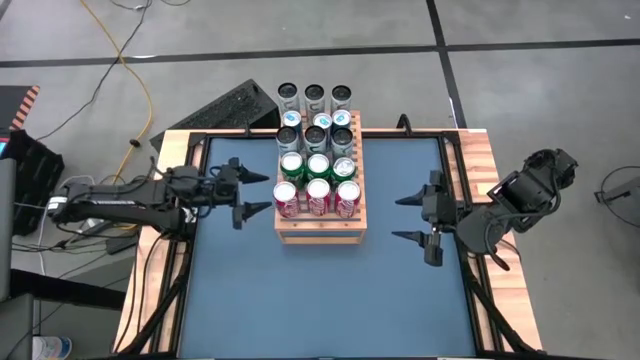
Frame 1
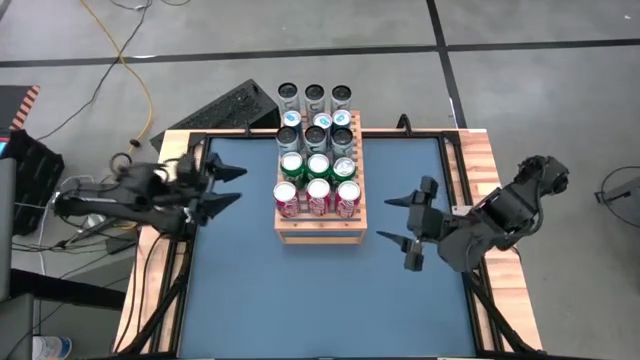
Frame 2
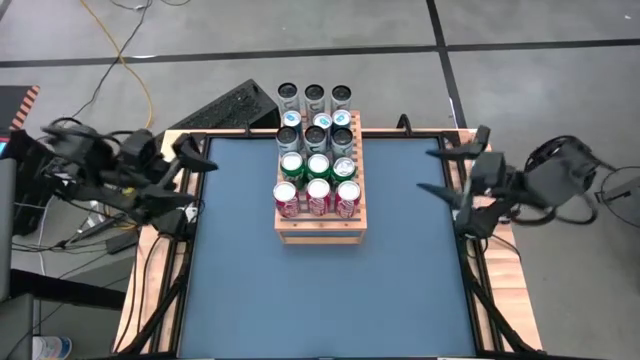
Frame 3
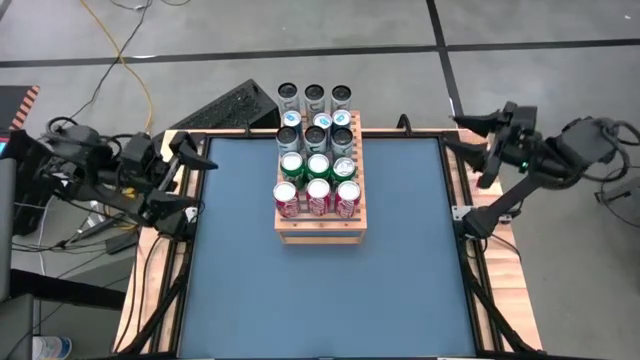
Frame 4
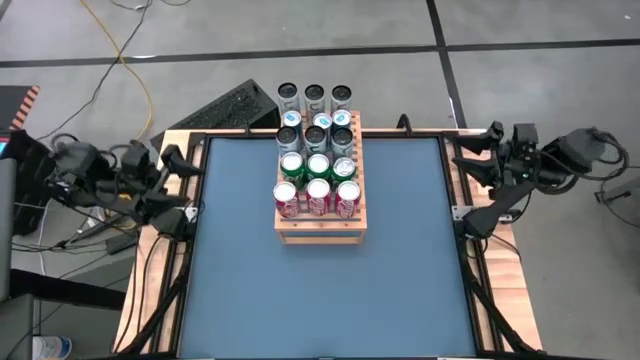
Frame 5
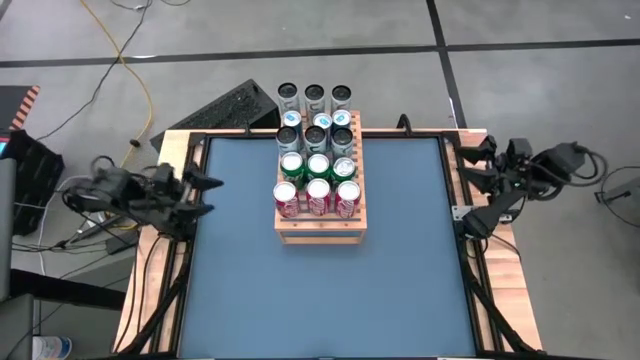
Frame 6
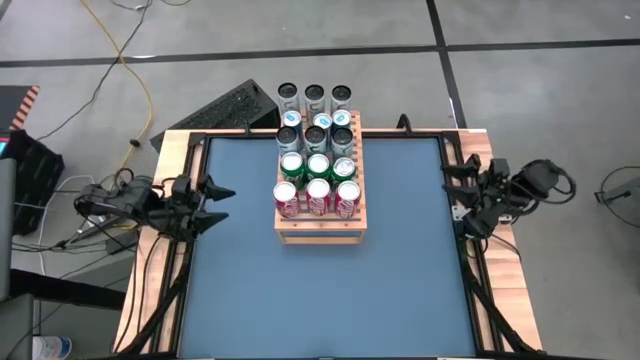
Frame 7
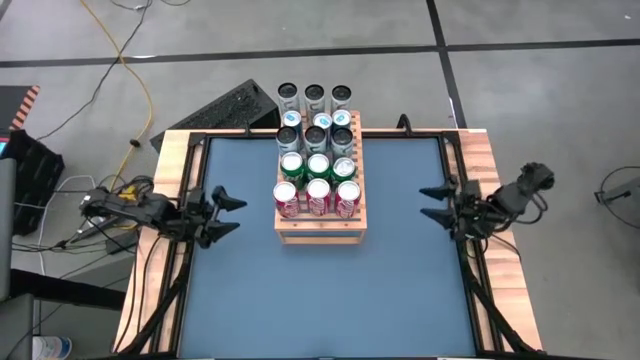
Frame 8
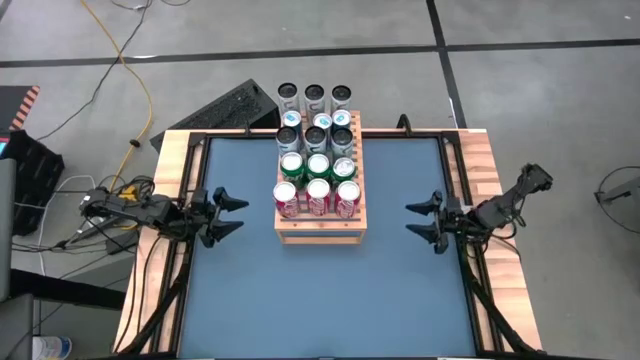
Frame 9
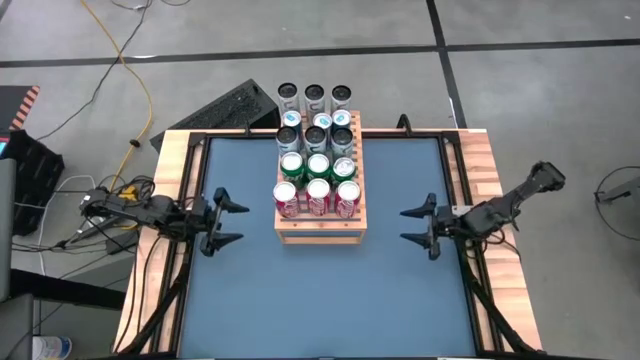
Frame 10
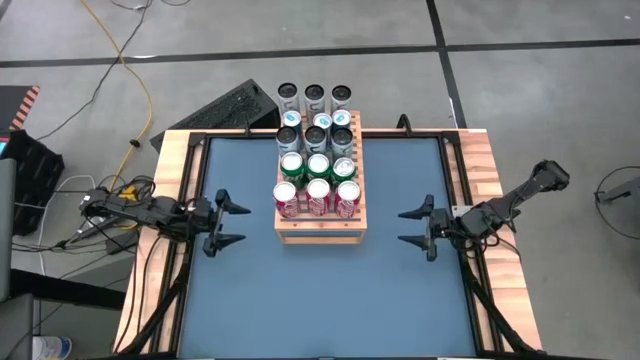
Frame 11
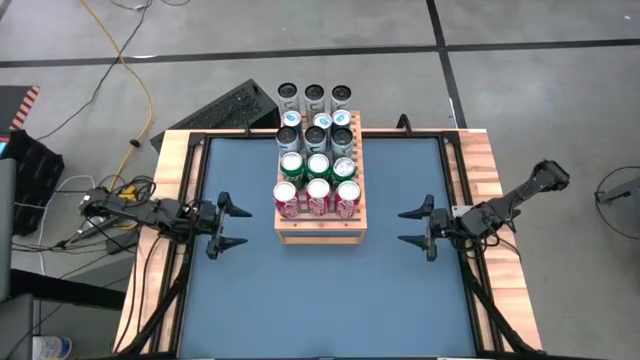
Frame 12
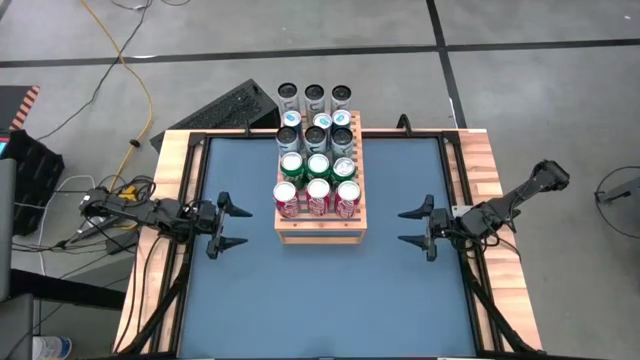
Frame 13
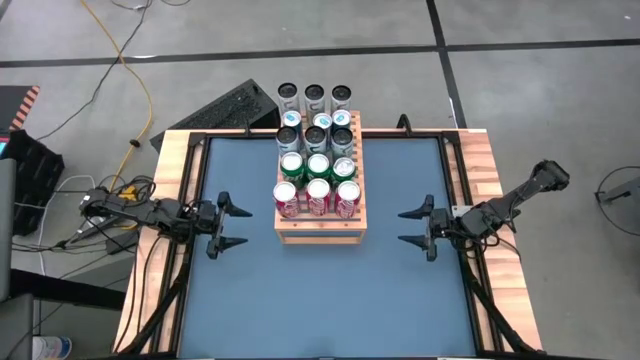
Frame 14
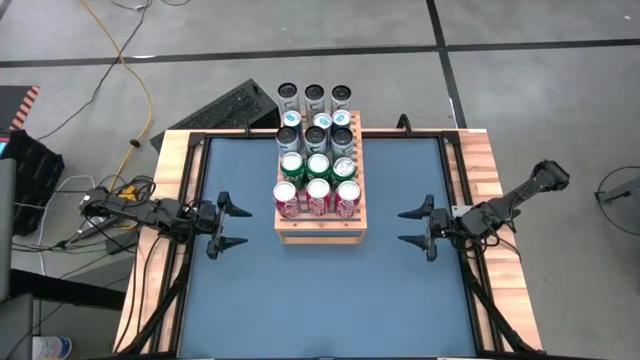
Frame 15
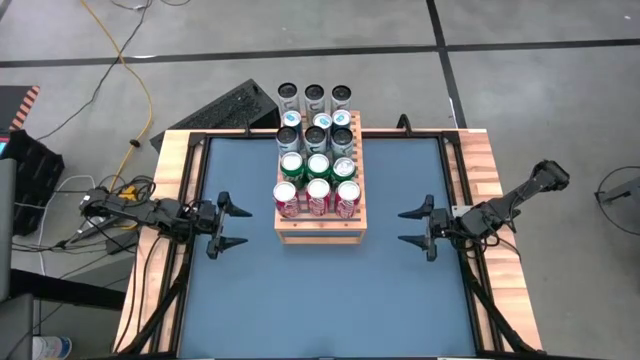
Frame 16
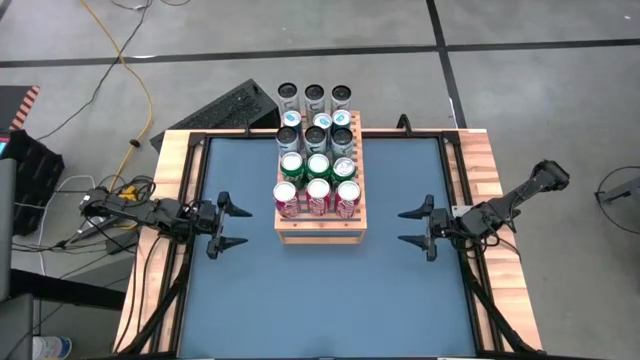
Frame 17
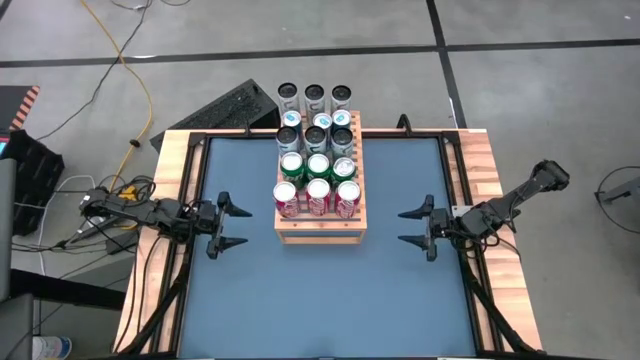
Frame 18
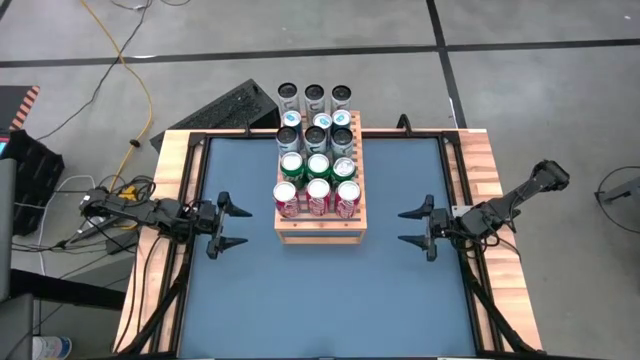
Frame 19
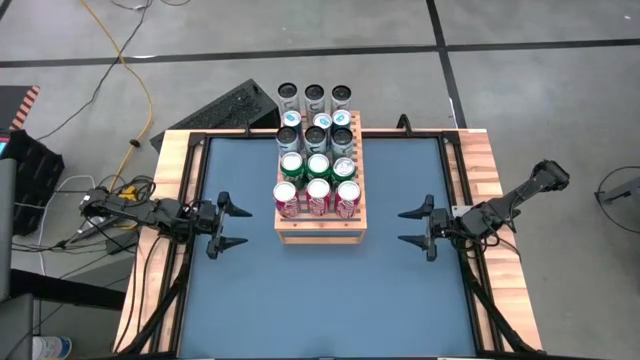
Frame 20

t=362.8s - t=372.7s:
Task: Place canned beverage on shelf
Return to Home Position

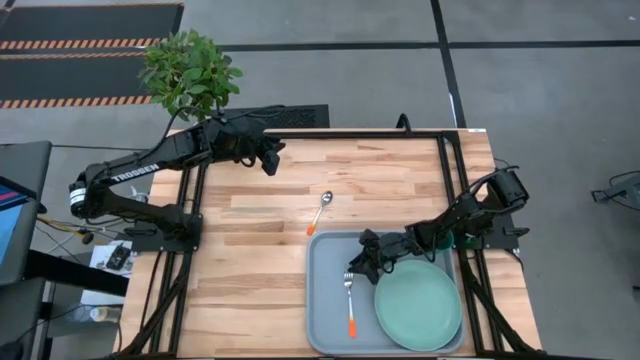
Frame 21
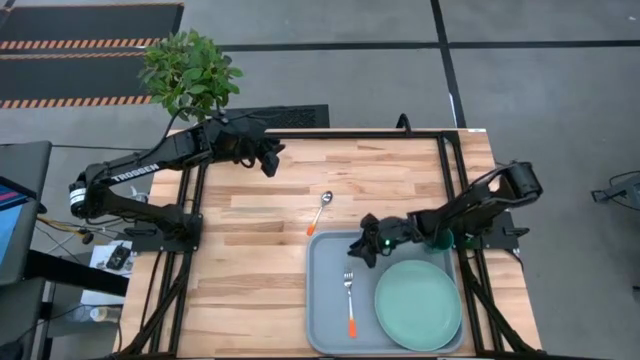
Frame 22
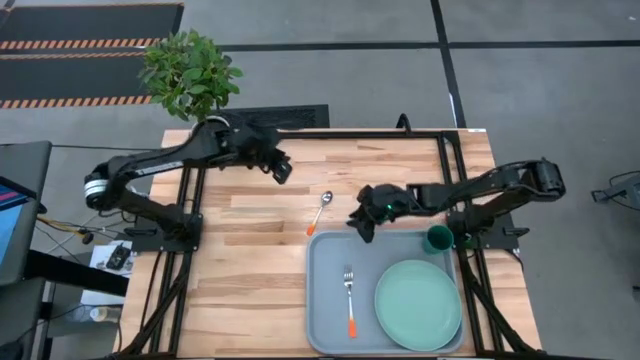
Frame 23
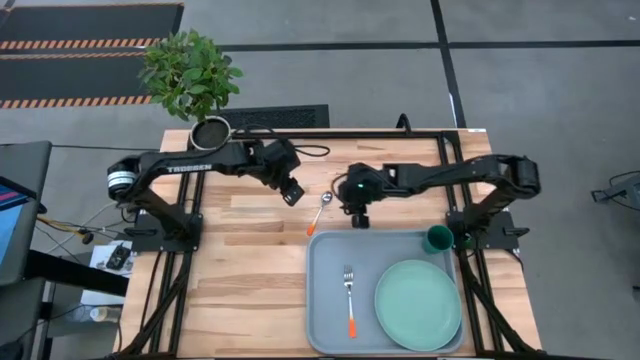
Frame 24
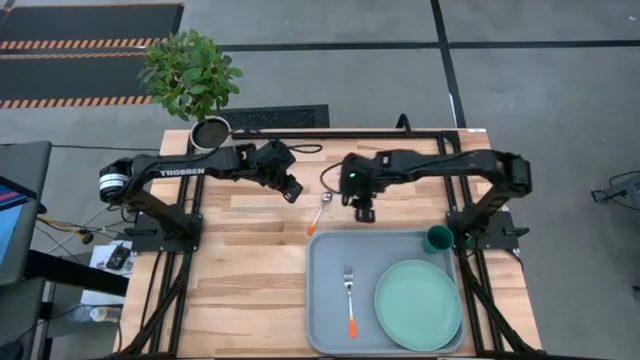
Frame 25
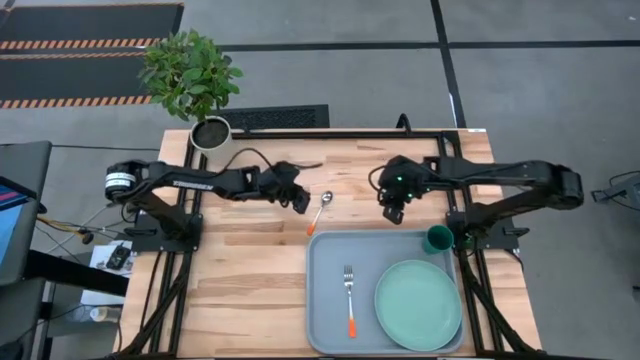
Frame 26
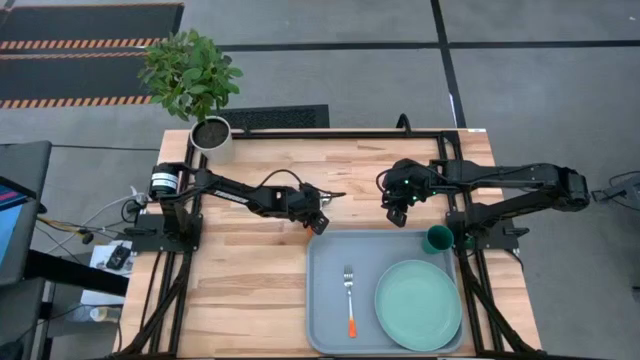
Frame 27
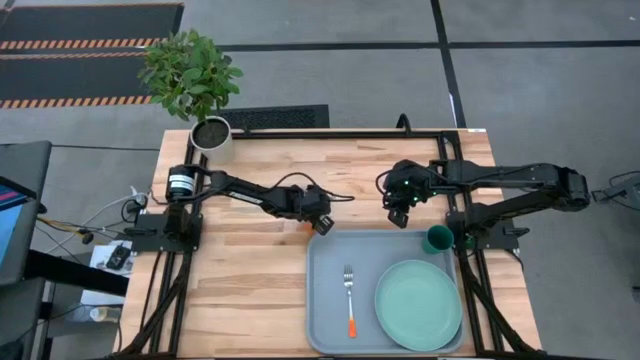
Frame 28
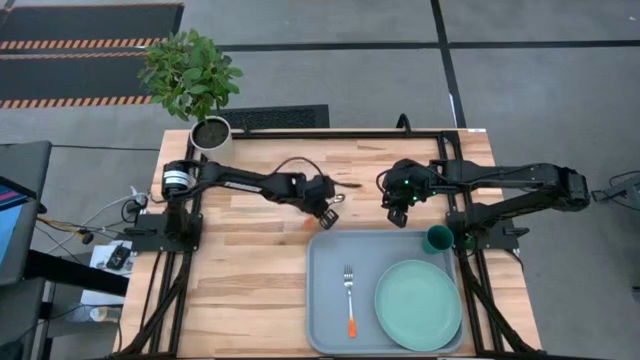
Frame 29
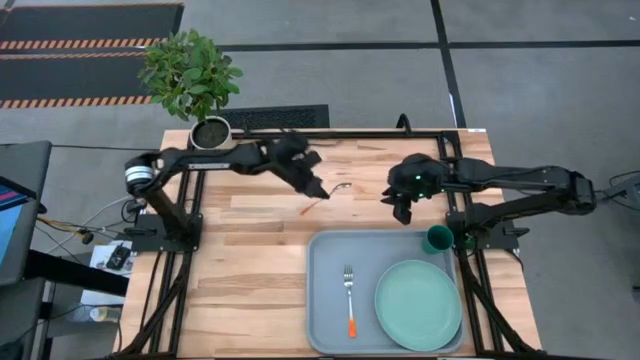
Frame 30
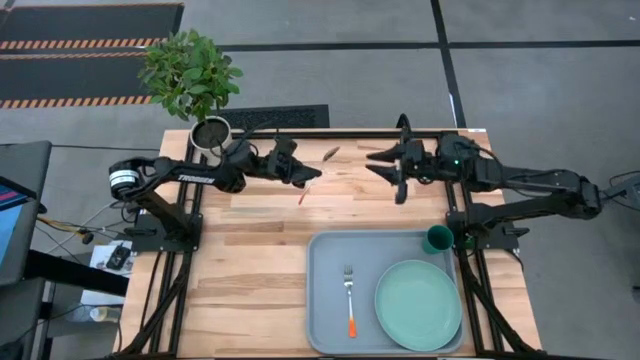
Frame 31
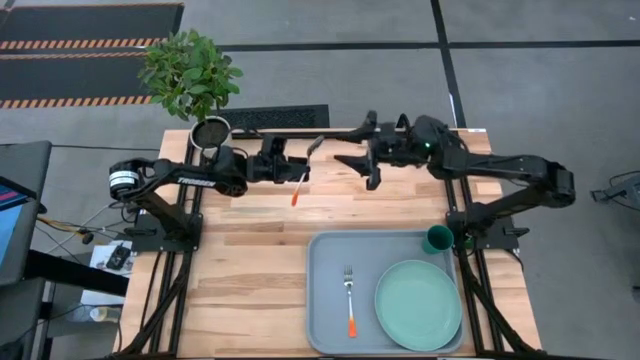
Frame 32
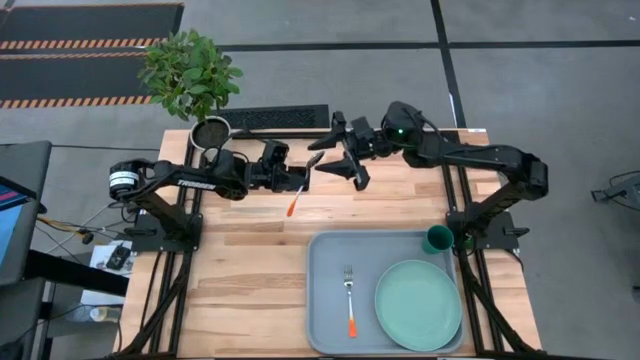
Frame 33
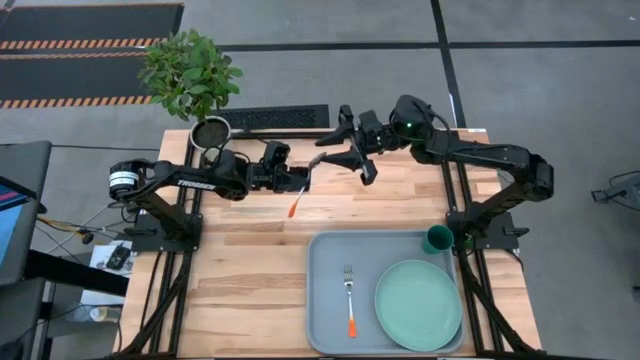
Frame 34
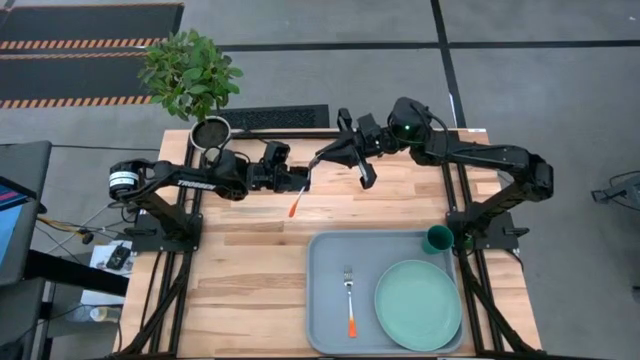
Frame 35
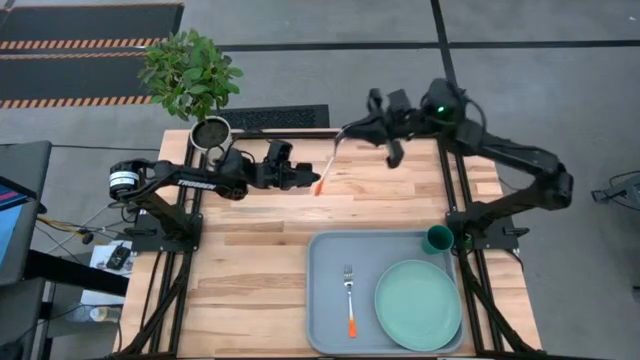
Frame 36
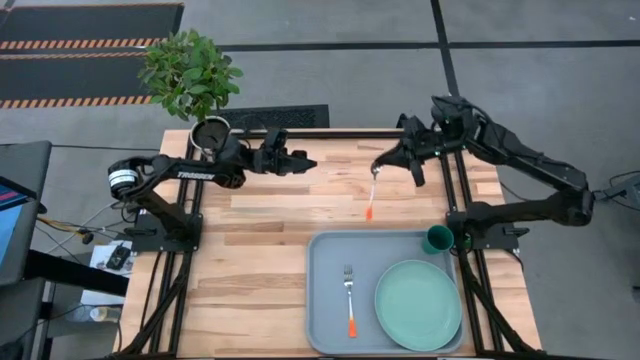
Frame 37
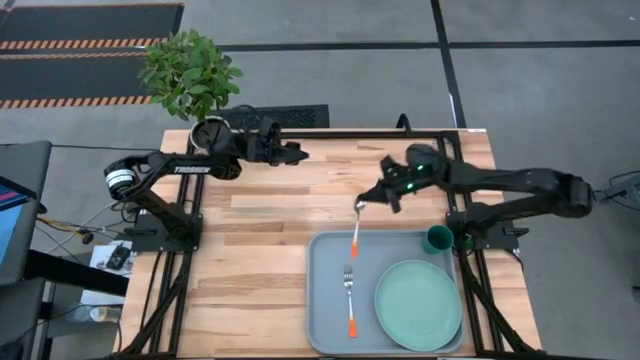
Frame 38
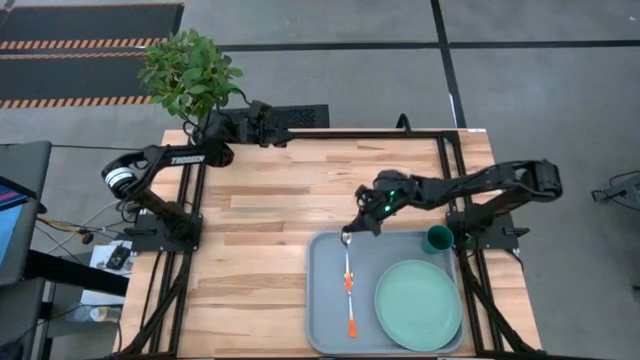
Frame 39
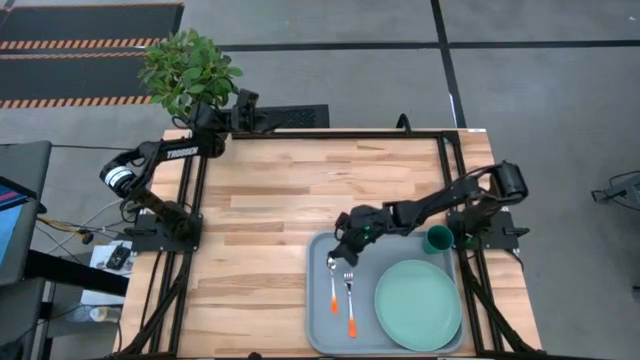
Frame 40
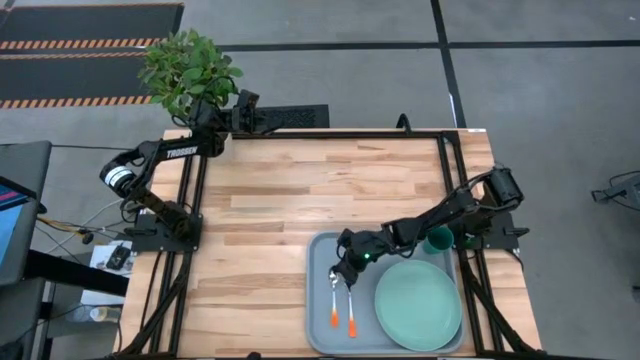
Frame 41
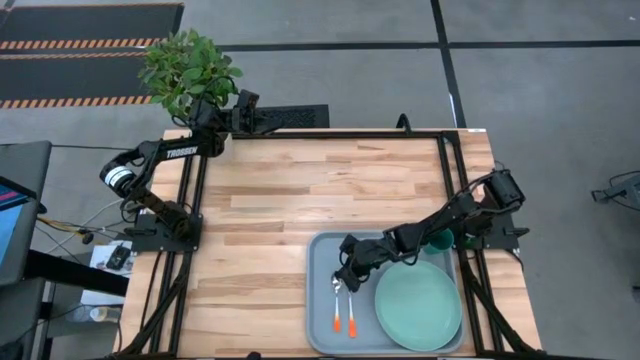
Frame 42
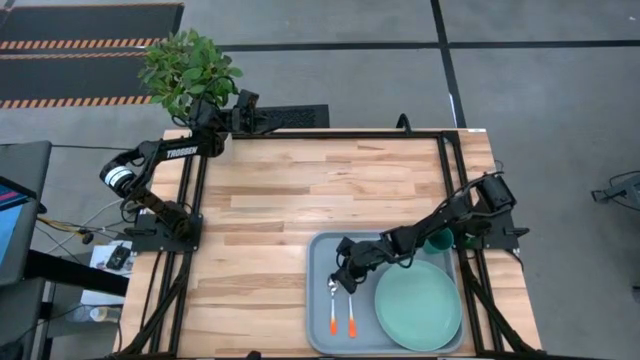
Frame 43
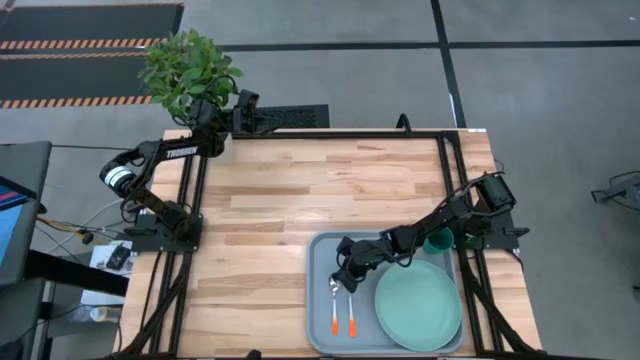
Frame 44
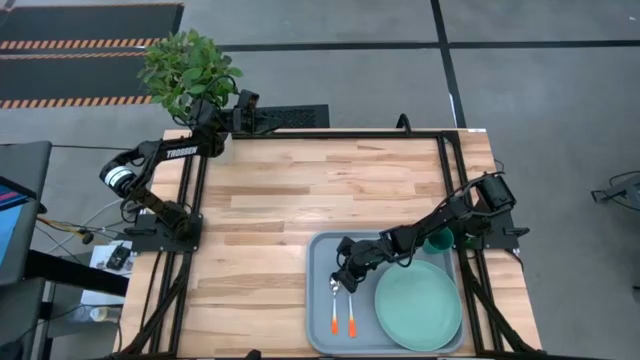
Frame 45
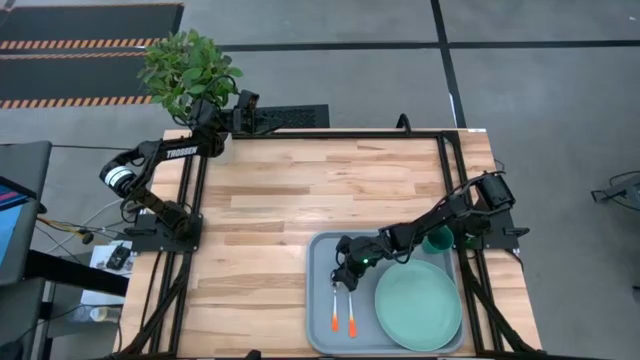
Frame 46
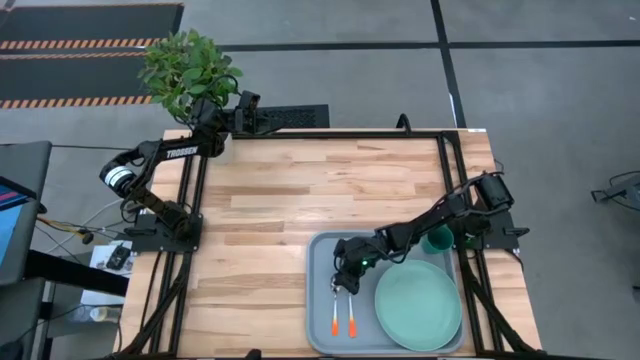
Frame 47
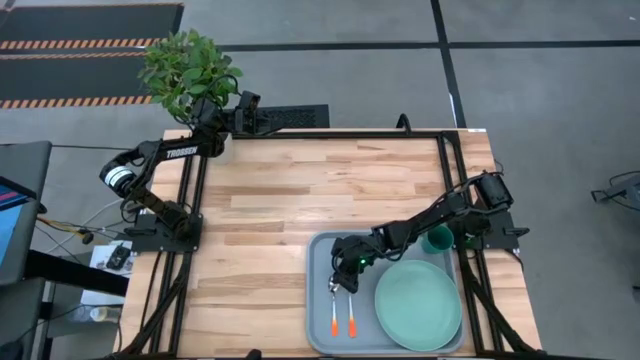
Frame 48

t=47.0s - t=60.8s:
Task: Pick and place plate/cup/fork/spoon on tray
Put the orange spoon beside the orange fork on the blue serving tray
